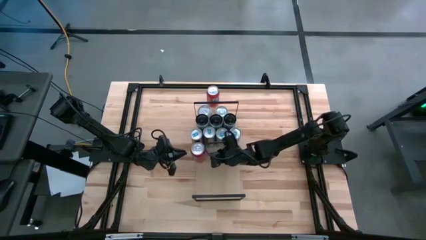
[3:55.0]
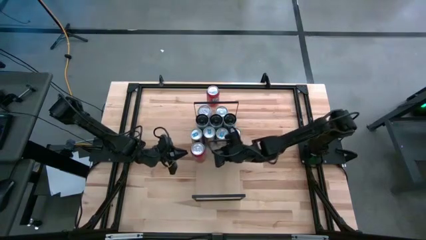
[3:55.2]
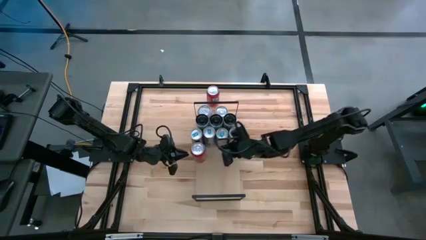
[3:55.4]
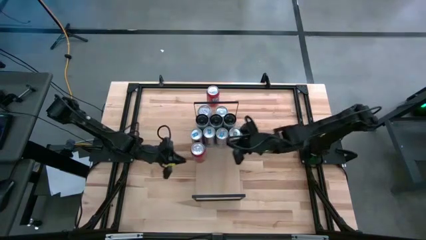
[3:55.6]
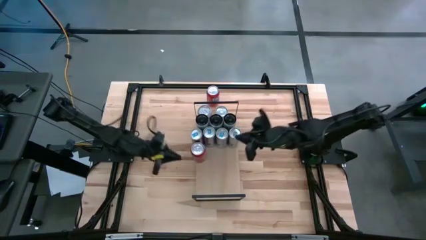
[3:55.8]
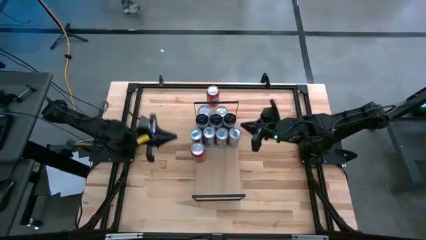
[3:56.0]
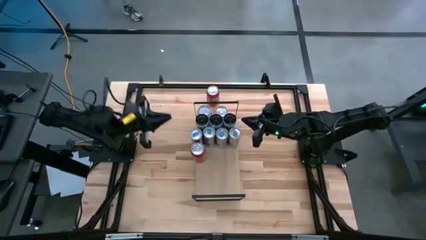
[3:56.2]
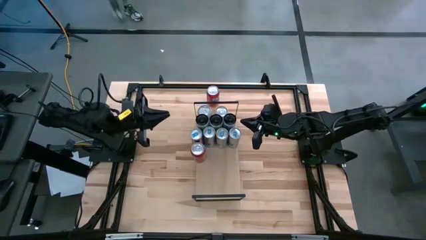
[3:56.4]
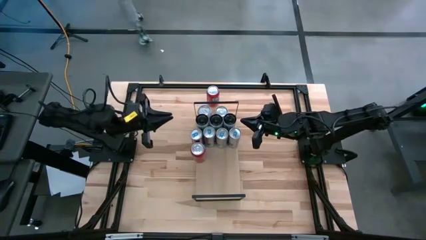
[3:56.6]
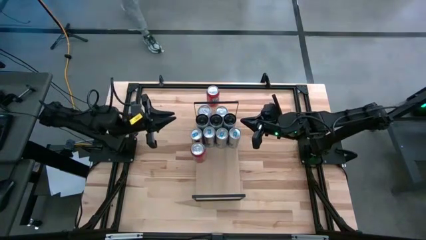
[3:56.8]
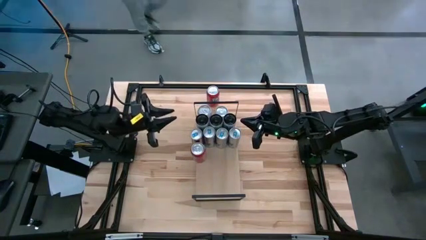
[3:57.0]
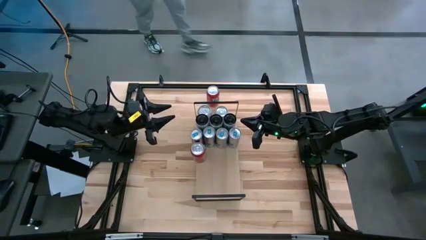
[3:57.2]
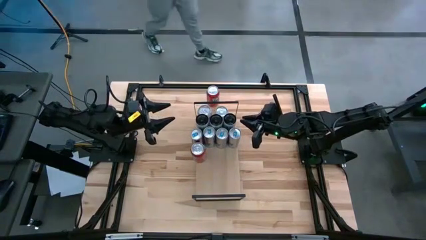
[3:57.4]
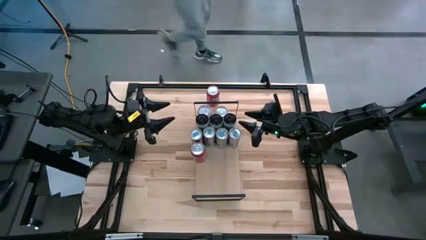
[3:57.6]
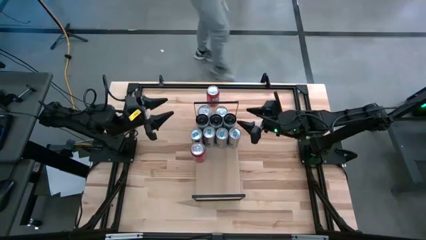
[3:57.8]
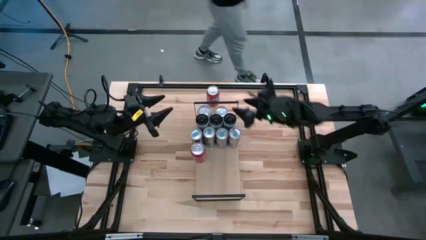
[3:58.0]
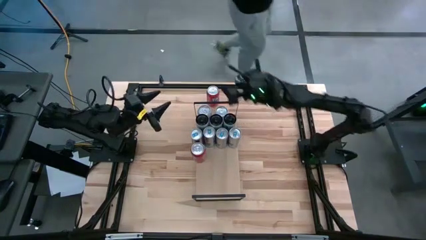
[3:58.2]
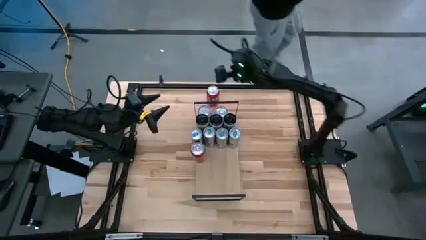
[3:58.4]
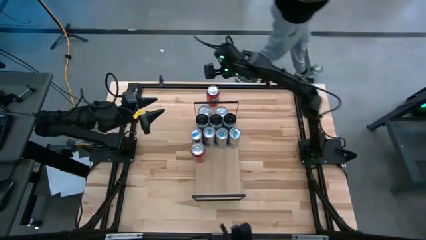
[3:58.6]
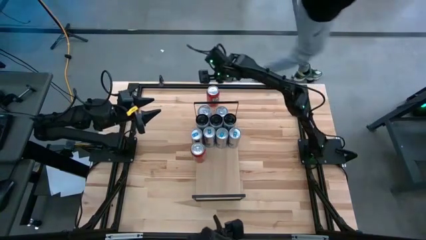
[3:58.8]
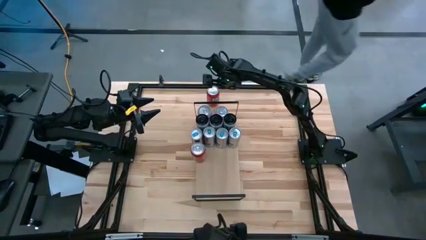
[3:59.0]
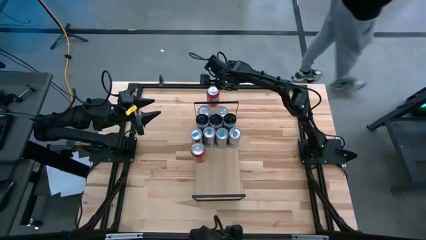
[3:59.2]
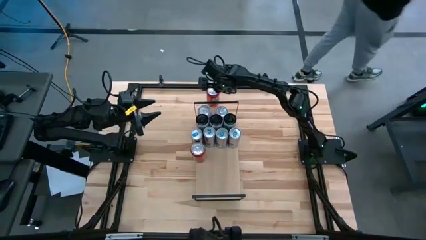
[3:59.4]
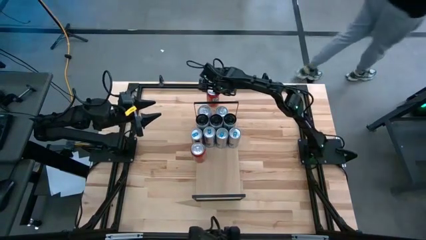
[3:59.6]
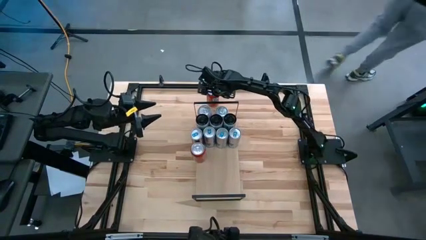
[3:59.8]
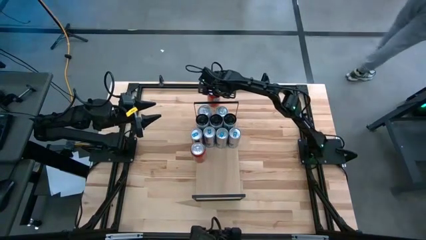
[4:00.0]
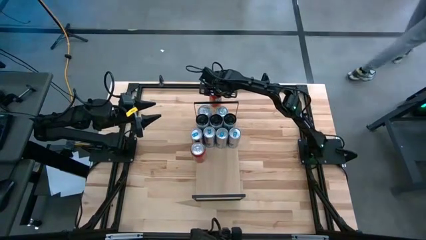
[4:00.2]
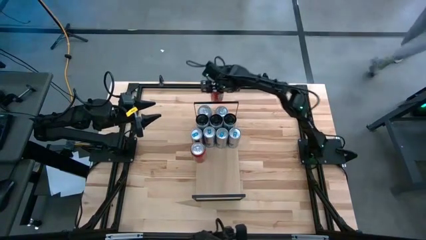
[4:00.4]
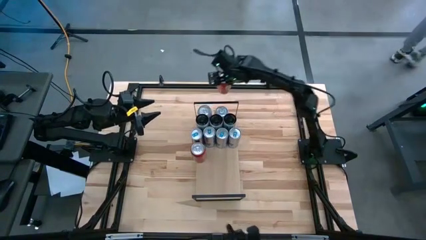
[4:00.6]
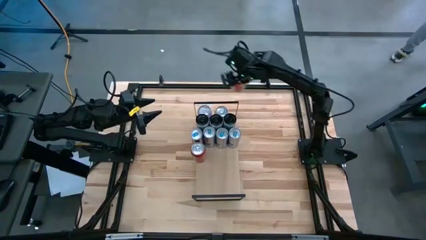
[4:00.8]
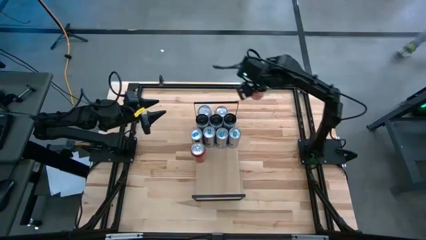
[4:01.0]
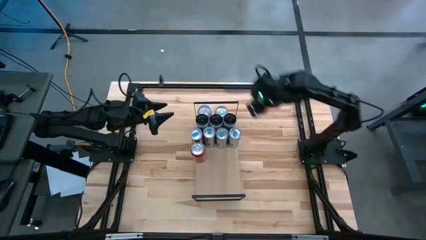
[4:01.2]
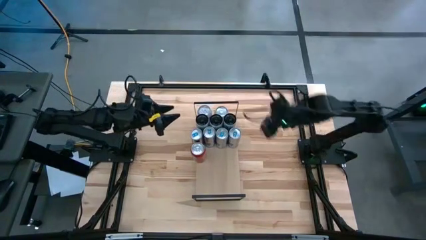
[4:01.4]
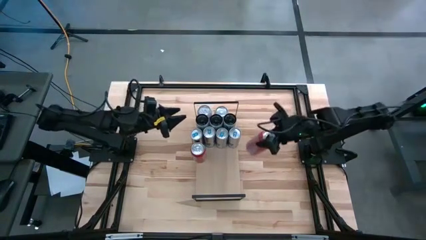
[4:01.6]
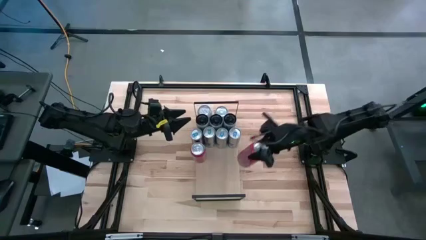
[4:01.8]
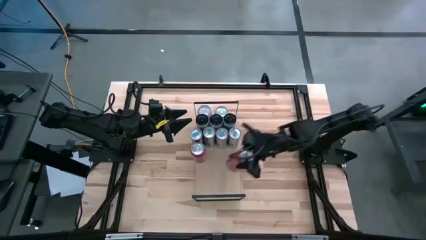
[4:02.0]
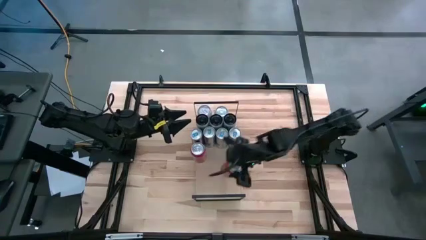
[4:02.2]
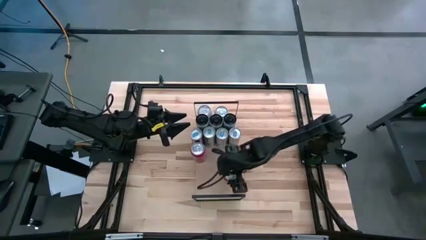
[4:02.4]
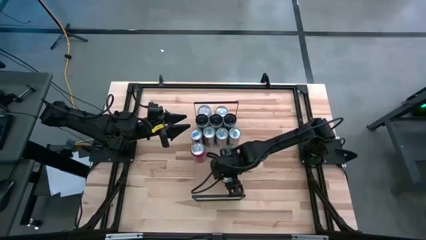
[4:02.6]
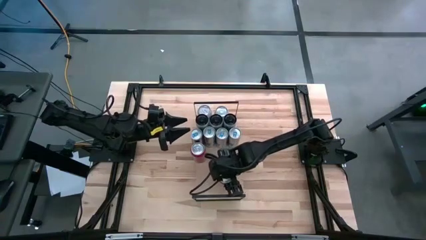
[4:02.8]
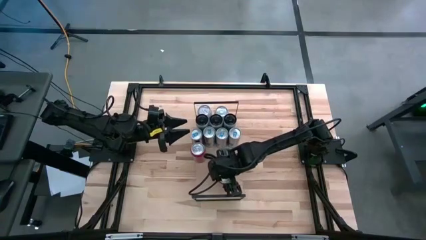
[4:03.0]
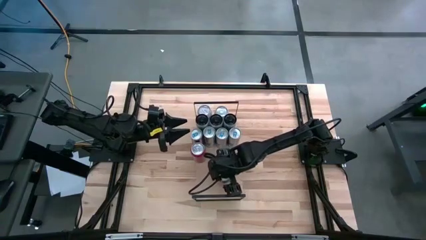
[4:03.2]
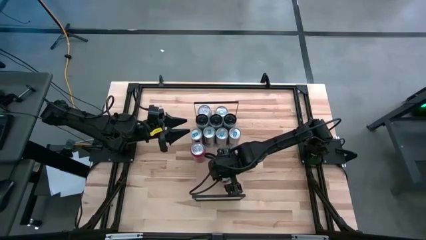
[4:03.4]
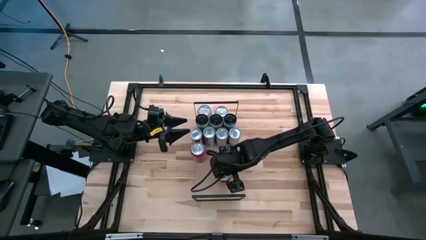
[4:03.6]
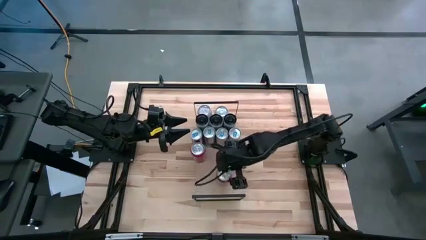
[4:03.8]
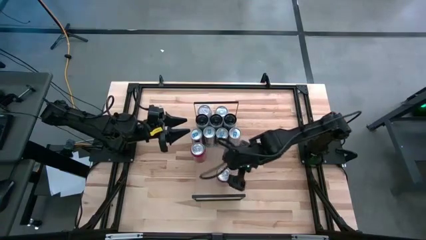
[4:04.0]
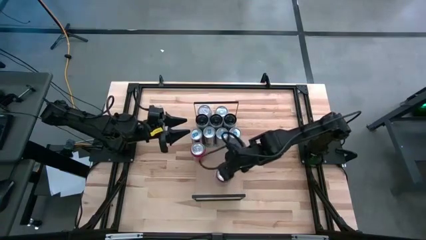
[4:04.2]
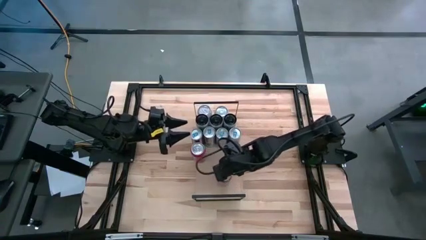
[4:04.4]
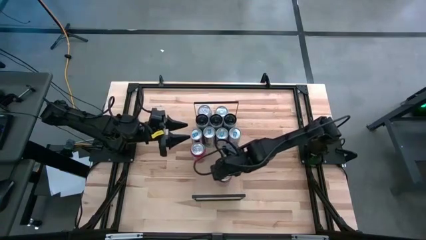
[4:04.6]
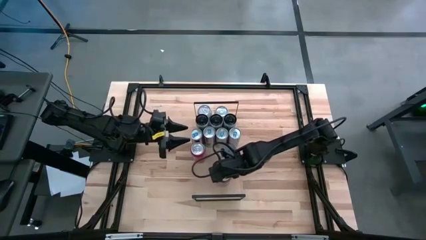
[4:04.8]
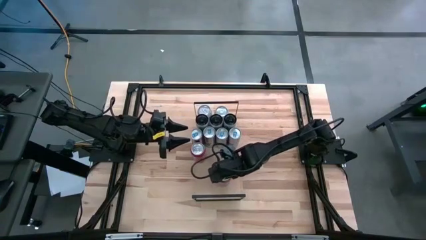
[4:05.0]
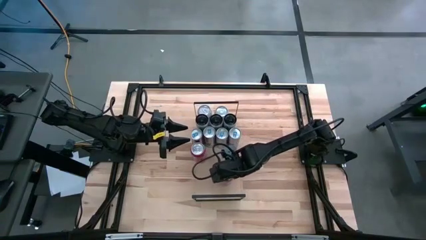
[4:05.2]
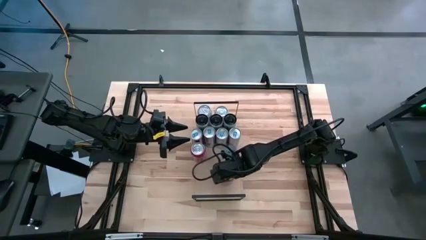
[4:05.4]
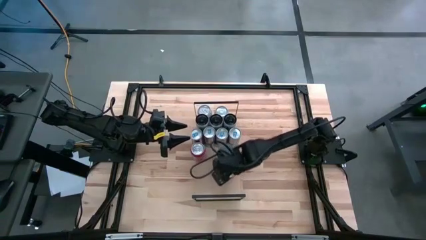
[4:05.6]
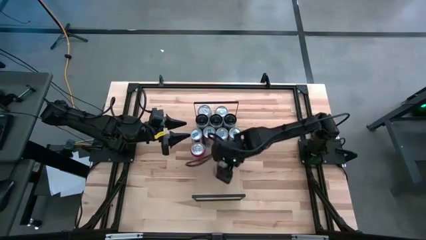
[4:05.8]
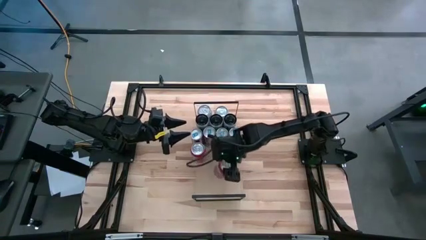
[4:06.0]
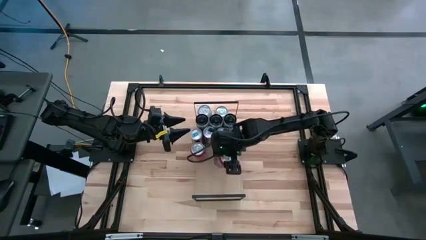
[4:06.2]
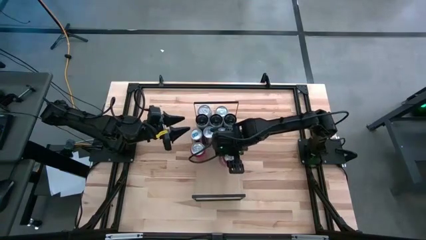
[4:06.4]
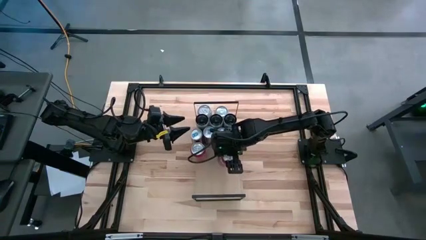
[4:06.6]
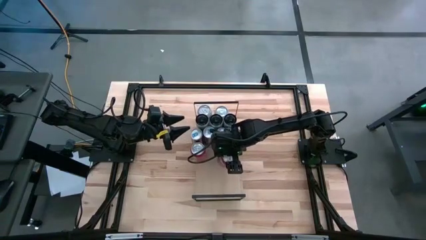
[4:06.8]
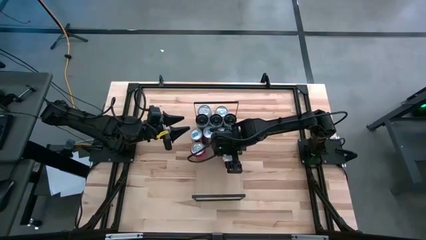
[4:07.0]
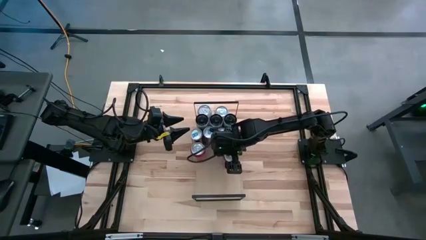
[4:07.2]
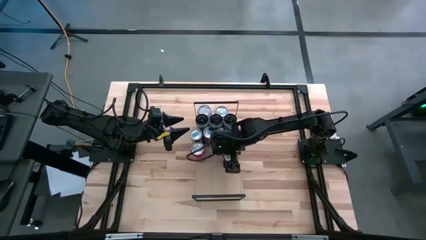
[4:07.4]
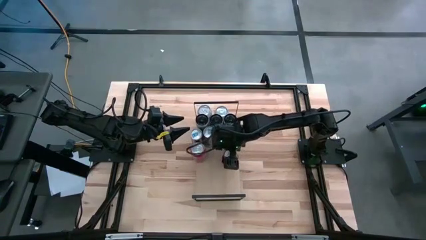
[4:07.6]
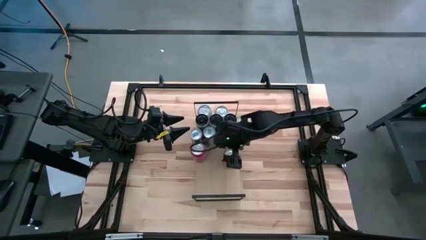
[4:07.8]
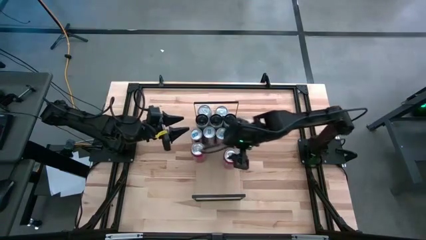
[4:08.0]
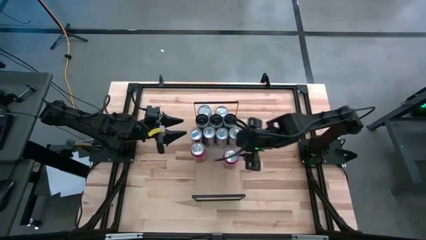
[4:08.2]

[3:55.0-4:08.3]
Task: Place canned beverage on shelf
Put the red soda can on the shelf aligned with the other red soda can

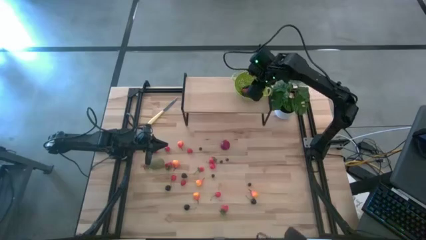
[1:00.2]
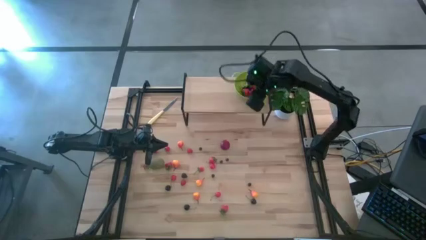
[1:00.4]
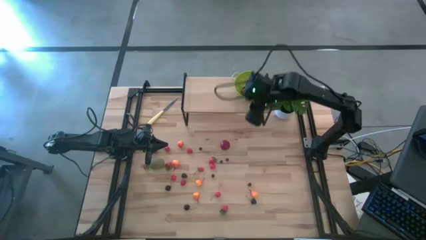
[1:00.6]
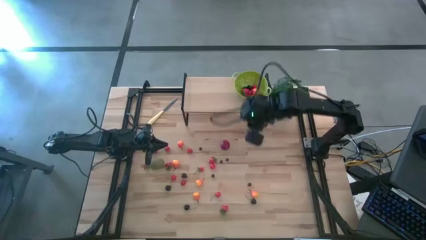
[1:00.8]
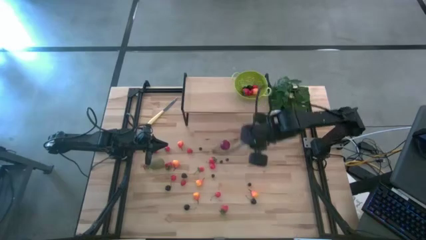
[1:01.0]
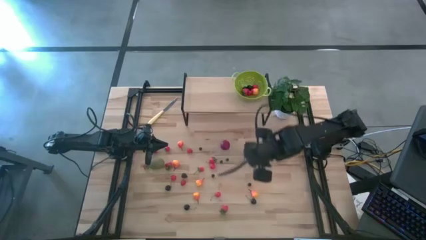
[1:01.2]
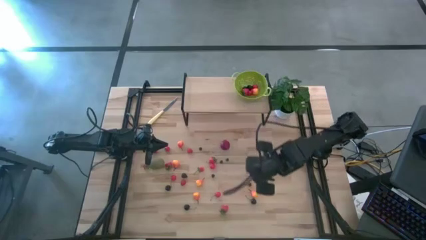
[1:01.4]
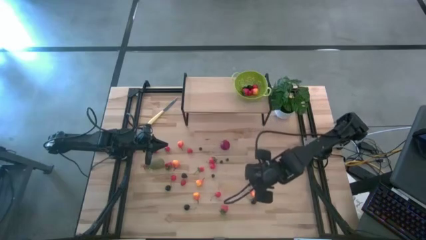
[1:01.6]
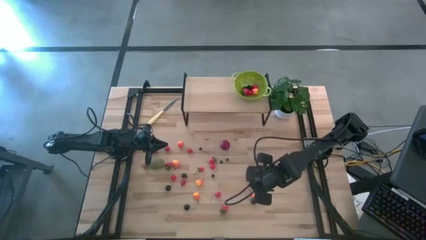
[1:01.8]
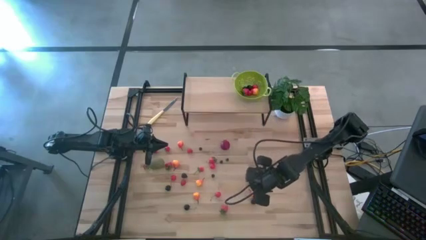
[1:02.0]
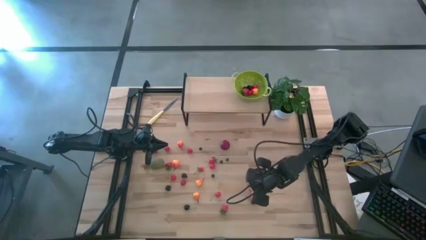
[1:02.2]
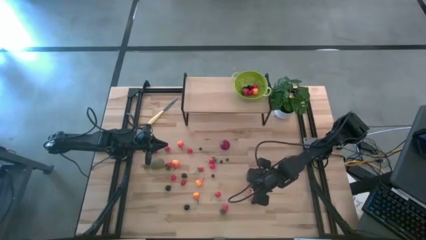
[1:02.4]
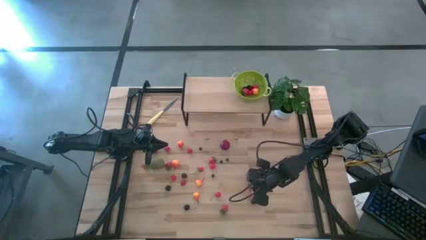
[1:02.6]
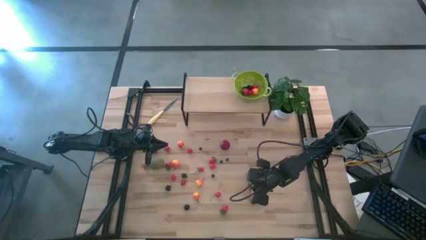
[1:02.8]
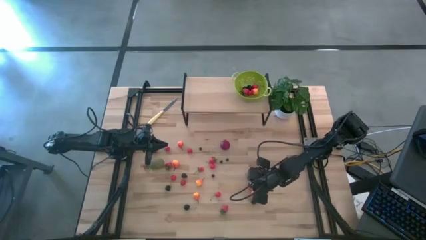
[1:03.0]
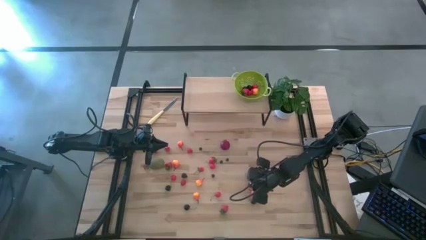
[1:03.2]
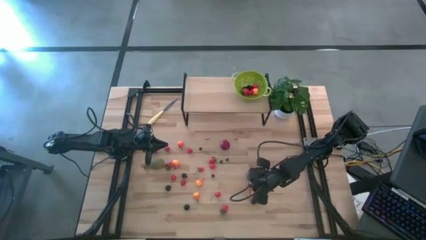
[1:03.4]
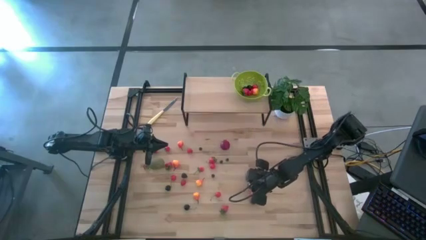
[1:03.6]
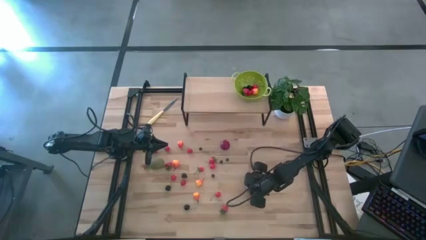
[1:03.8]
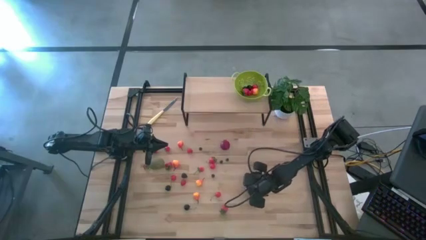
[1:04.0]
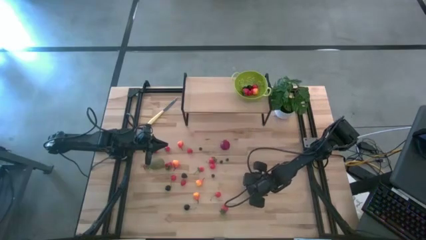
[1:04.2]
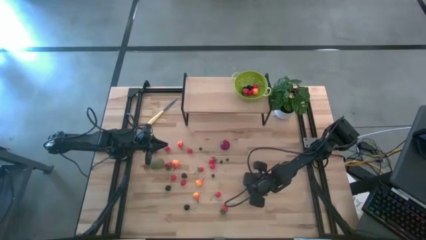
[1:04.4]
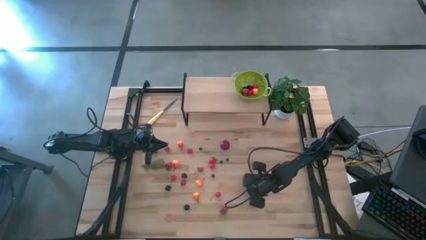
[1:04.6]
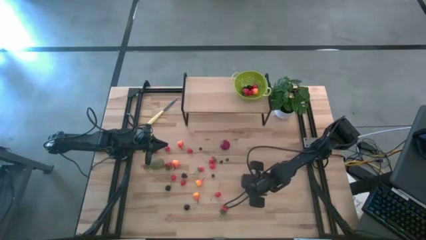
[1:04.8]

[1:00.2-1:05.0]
Task: Build produce basket
Put the blueberry into green basket
